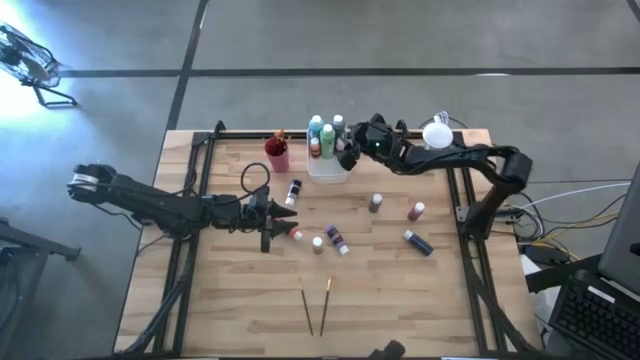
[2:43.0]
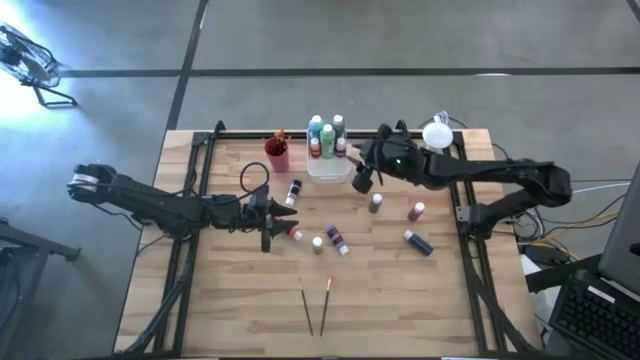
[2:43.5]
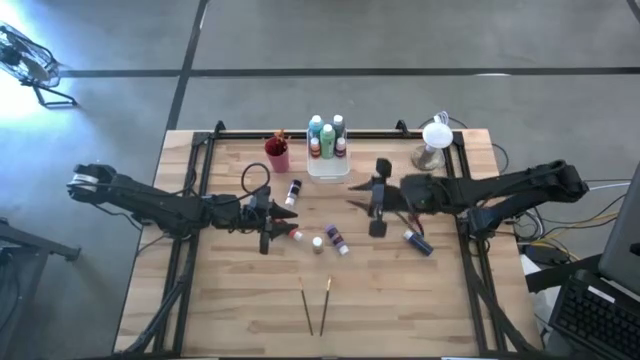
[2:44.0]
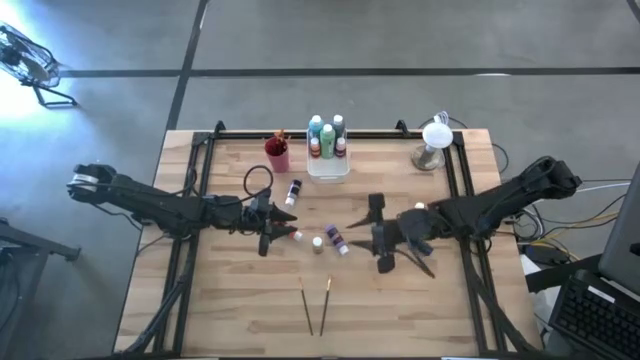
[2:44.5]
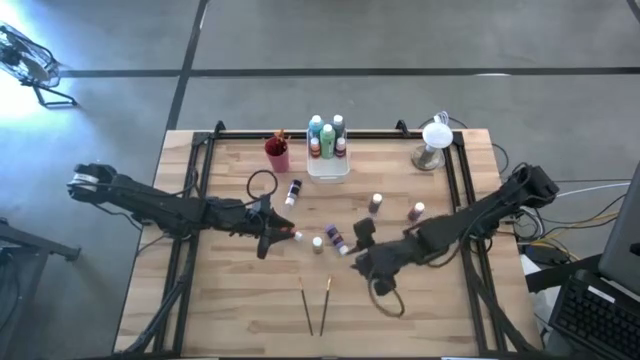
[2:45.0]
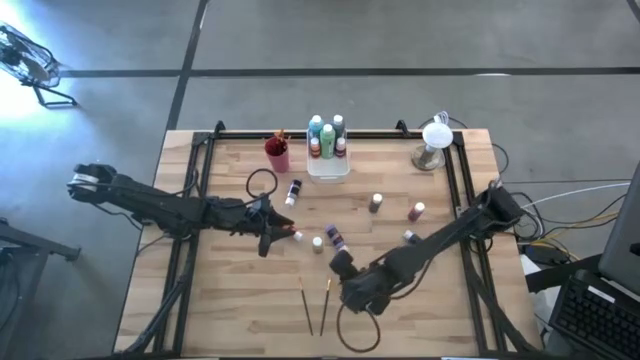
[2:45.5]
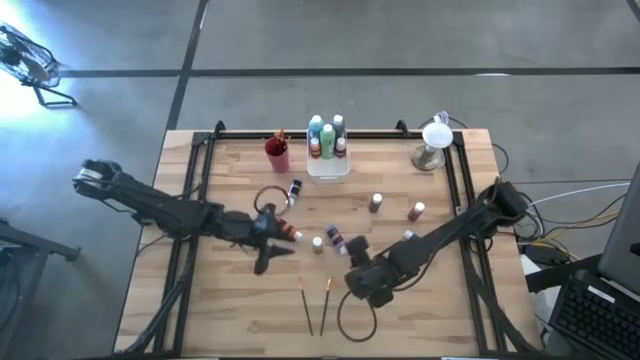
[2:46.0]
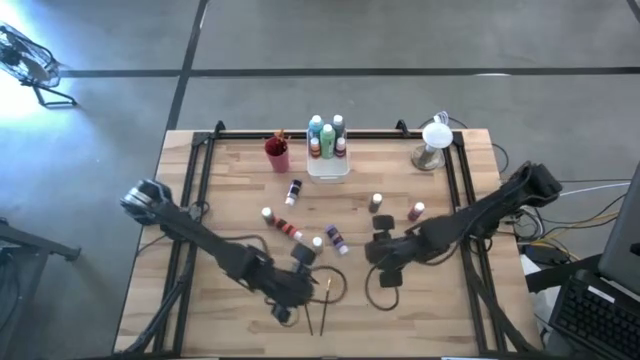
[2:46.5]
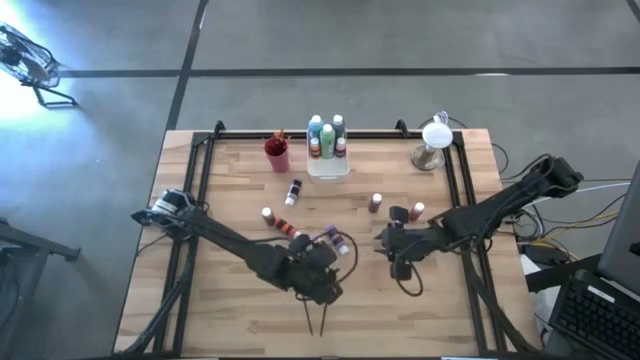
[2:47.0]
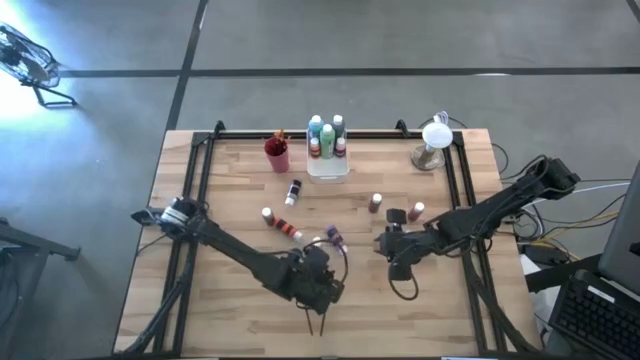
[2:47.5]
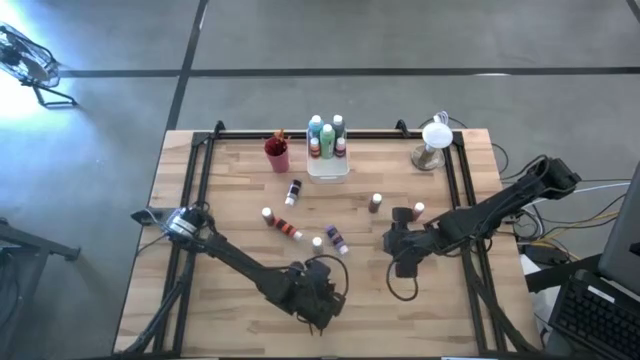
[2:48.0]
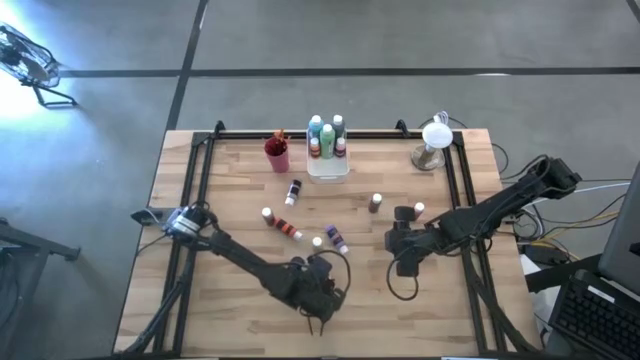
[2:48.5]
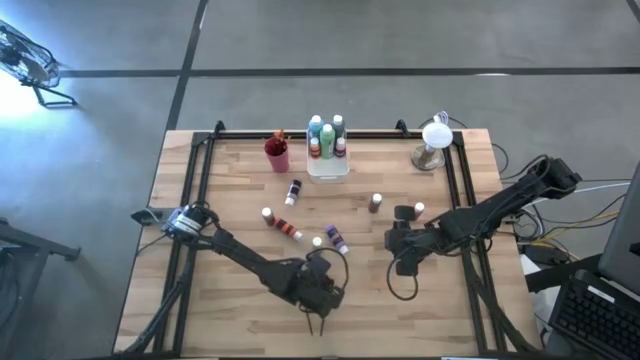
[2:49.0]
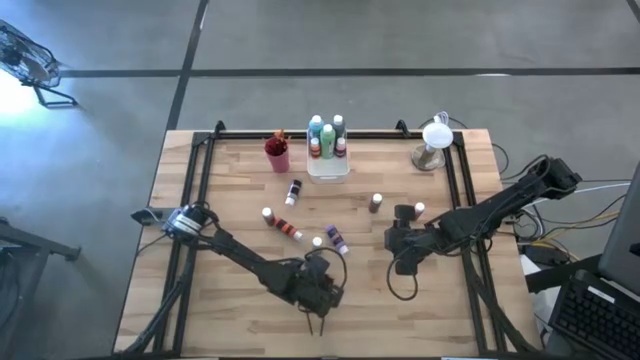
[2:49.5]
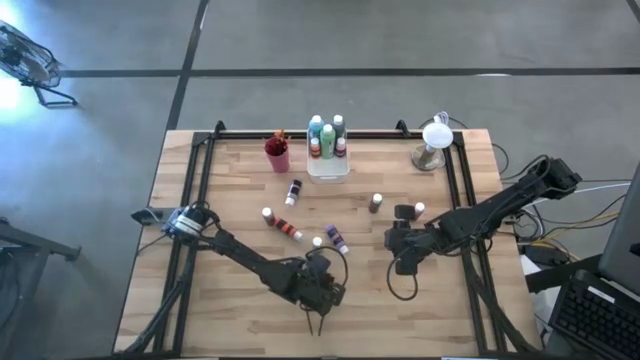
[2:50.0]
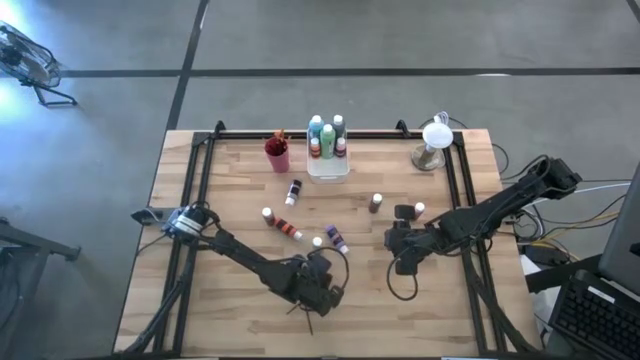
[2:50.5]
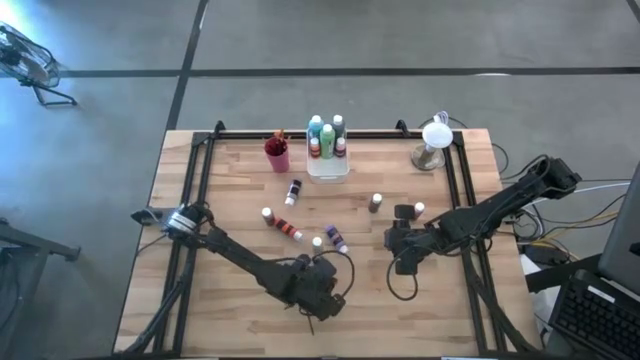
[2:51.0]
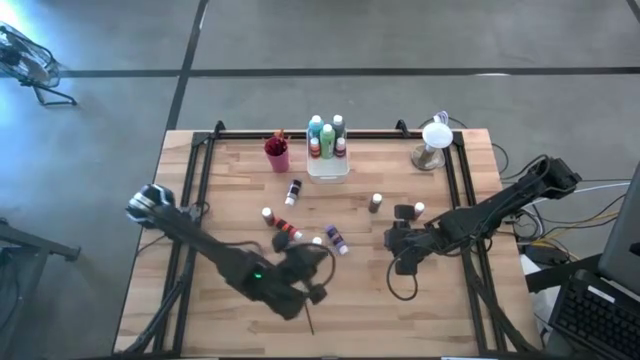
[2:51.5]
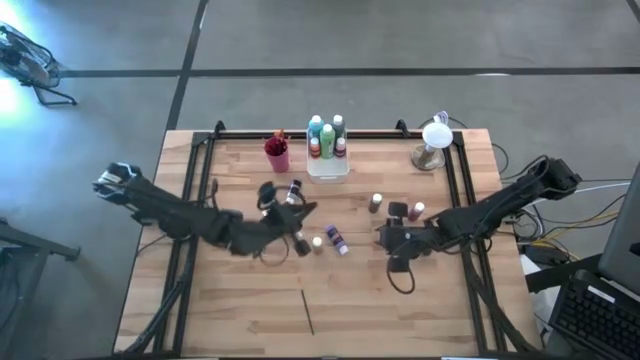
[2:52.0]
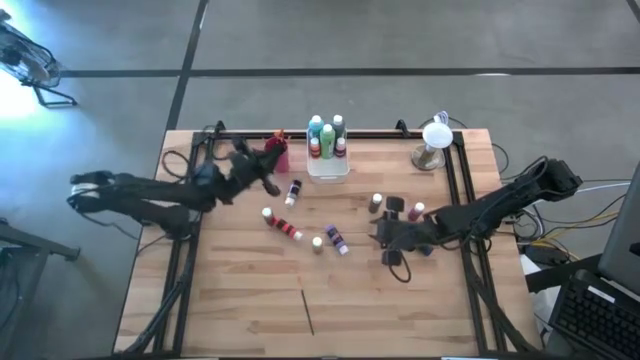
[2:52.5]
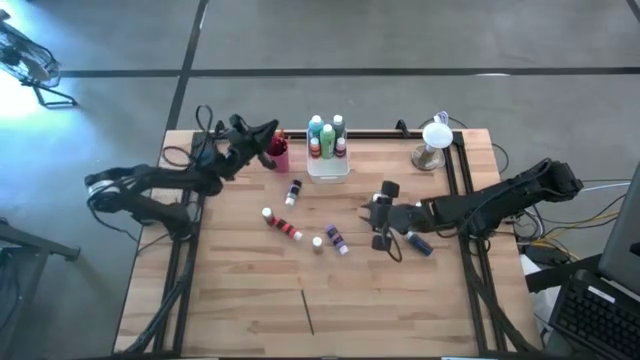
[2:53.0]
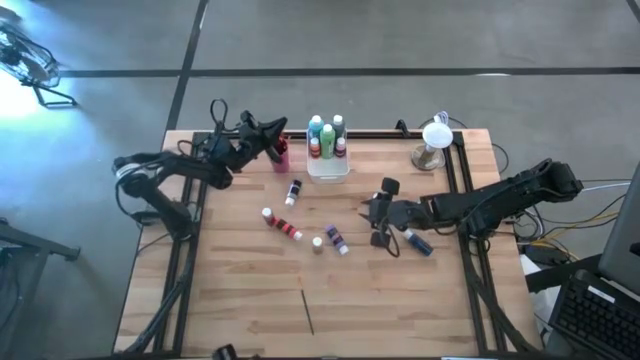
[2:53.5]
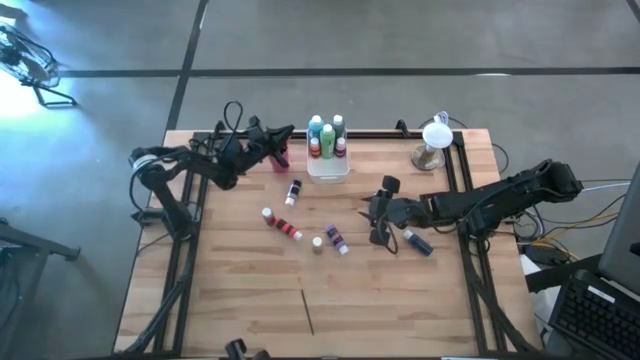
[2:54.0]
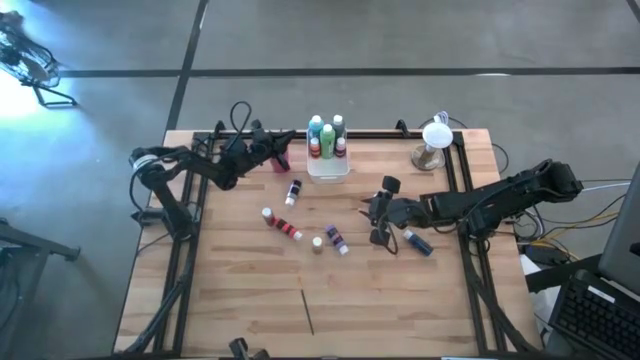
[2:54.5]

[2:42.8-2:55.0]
Task: Pick & Place Paint Supplies
Put the gold paint brush into the pink cup

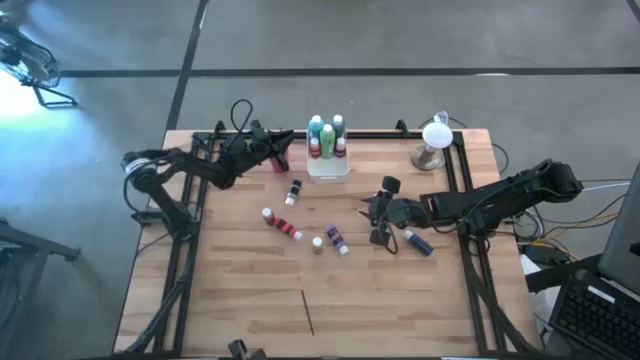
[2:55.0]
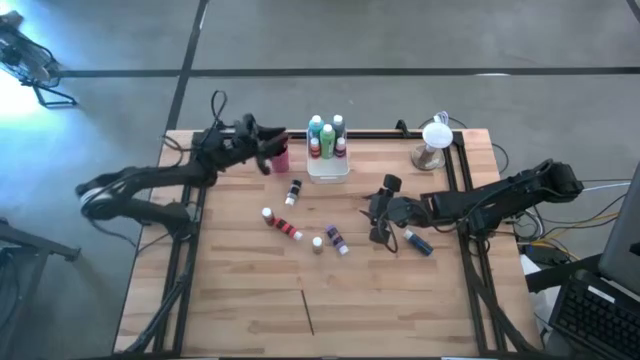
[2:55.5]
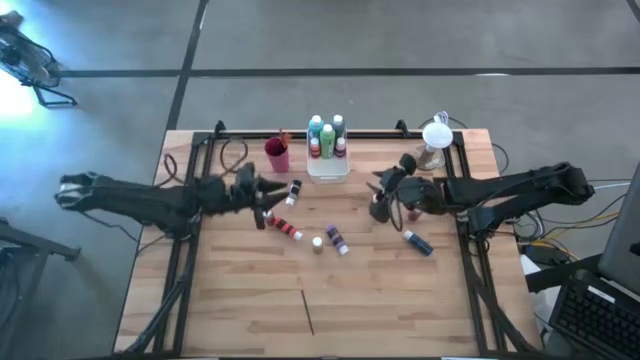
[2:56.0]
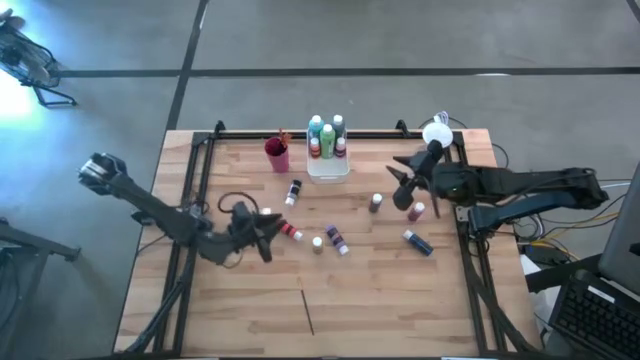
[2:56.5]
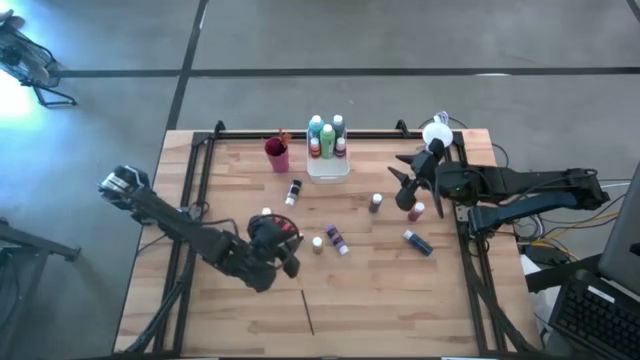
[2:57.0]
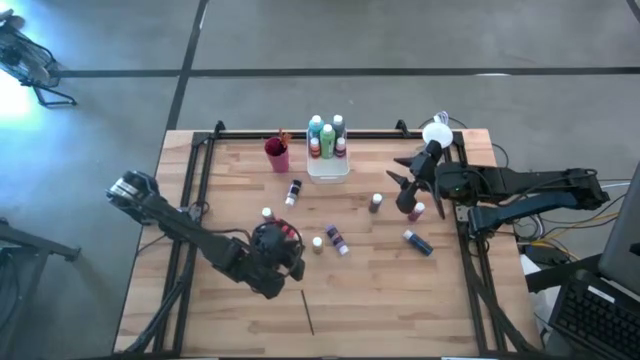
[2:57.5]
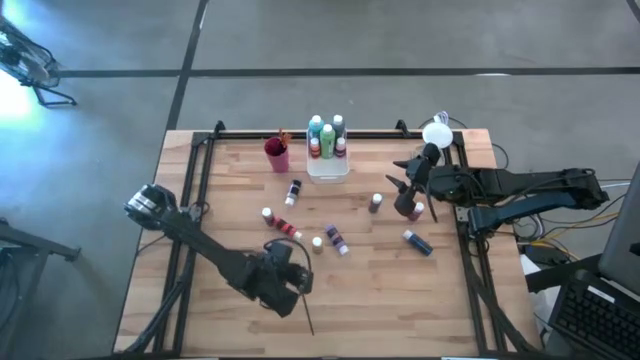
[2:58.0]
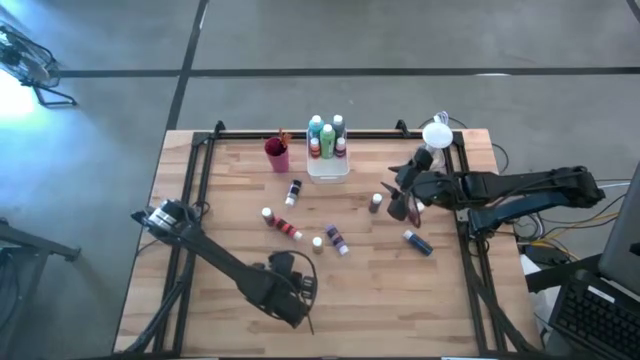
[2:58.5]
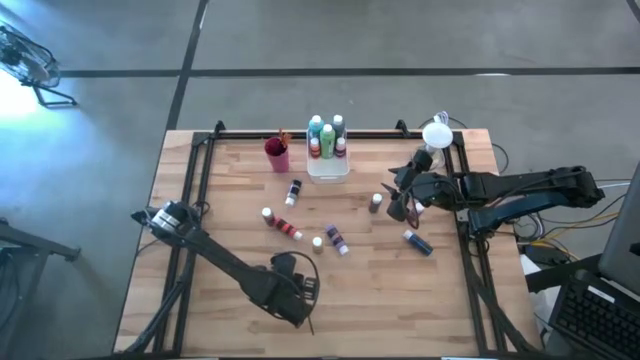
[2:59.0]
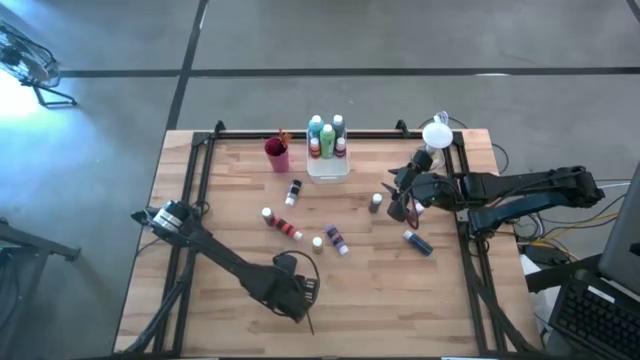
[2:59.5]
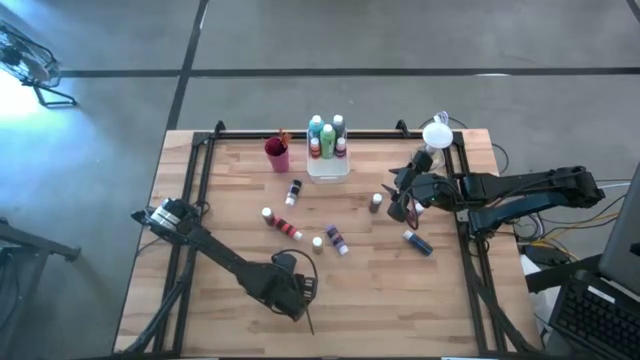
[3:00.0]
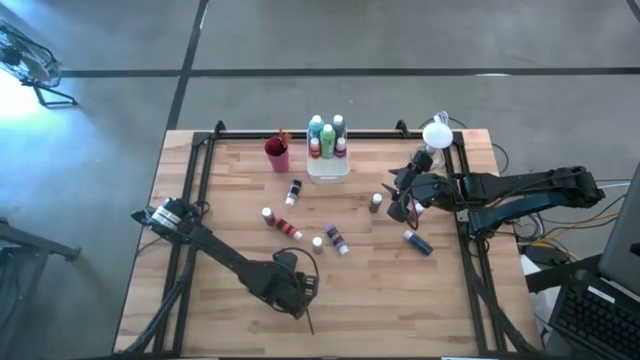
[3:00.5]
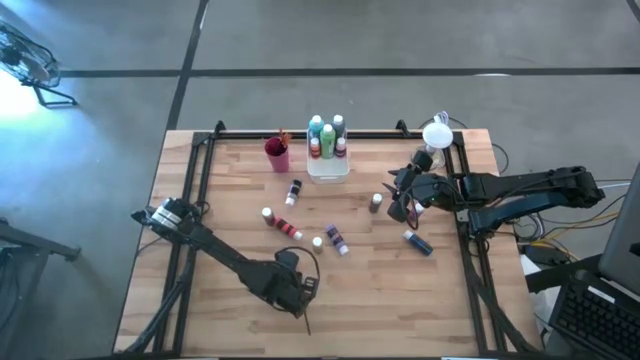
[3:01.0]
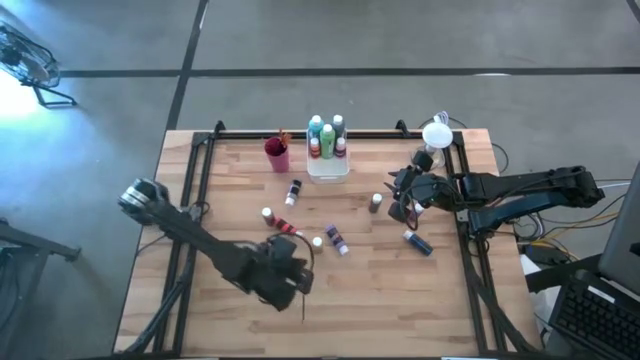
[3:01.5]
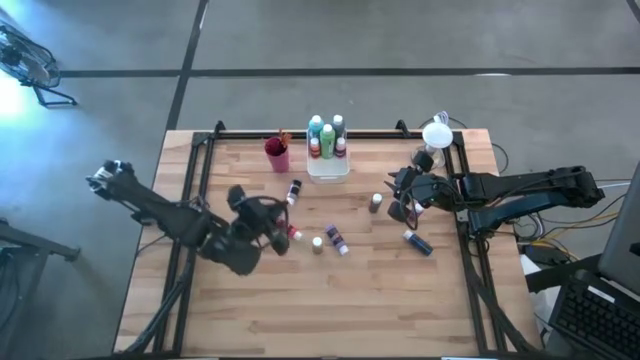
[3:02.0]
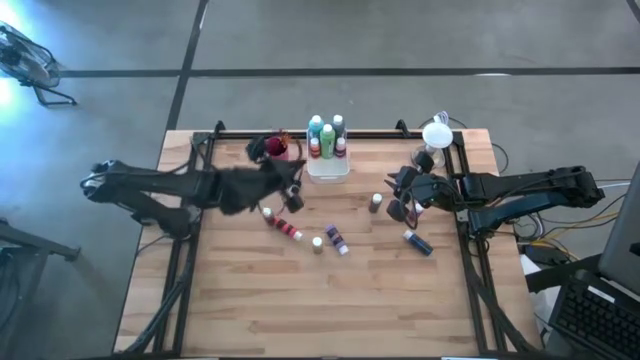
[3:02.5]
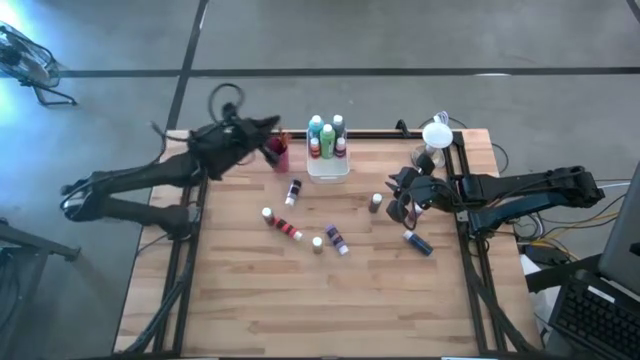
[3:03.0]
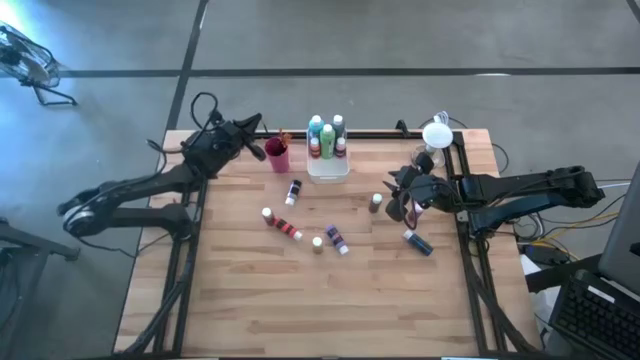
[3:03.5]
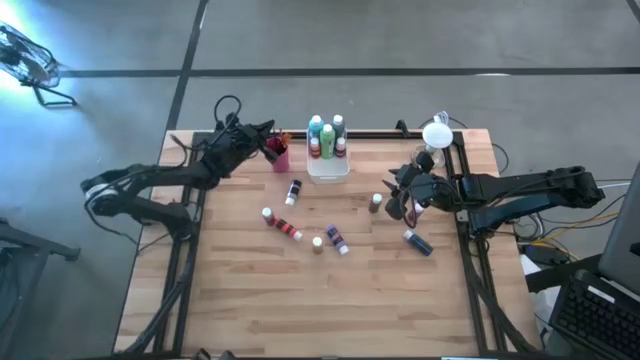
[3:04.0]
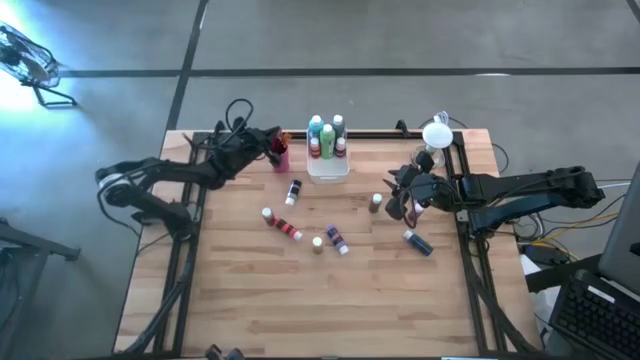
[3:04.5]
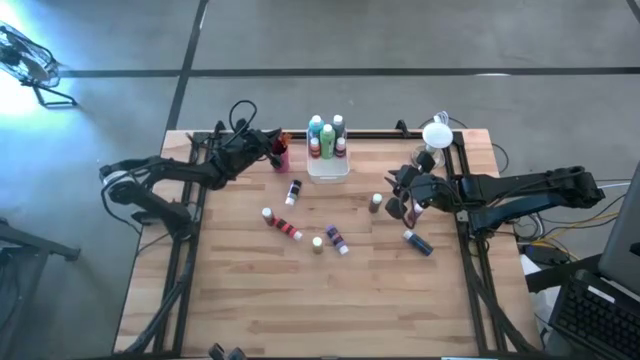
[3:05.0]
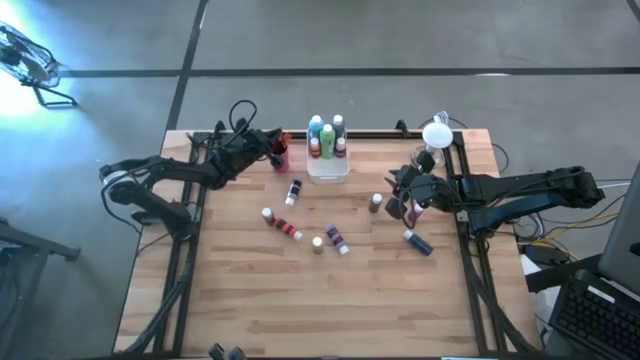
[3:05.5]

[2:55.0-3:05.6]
Put the gold paint brush into the pink cup
